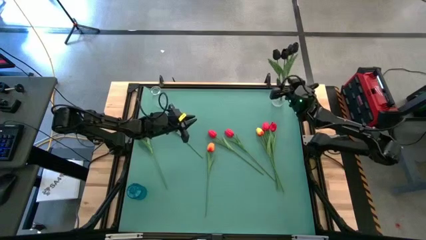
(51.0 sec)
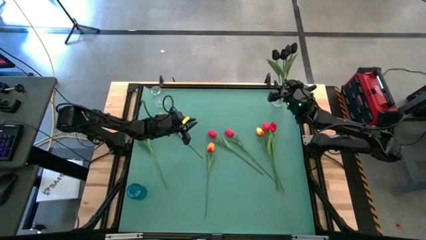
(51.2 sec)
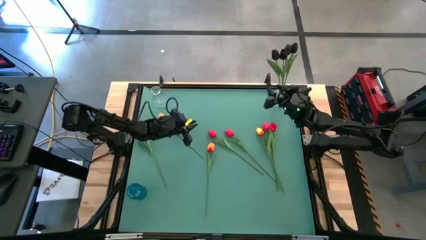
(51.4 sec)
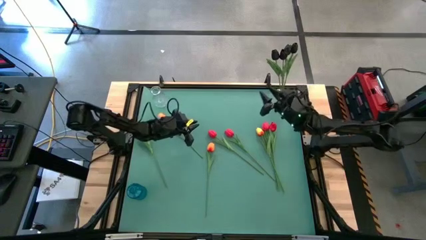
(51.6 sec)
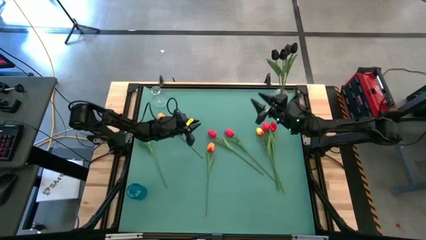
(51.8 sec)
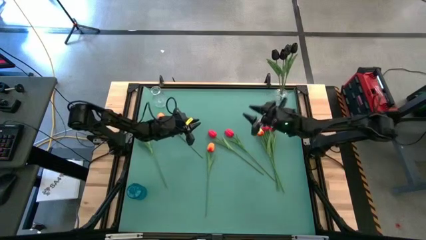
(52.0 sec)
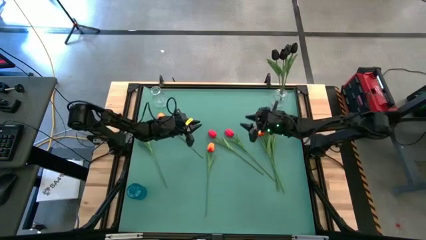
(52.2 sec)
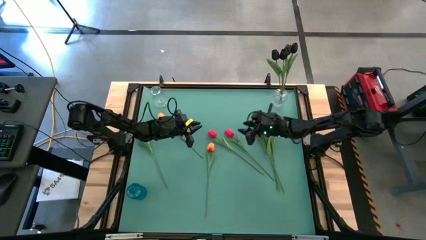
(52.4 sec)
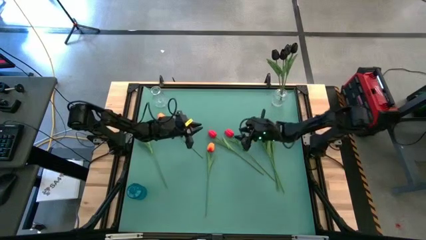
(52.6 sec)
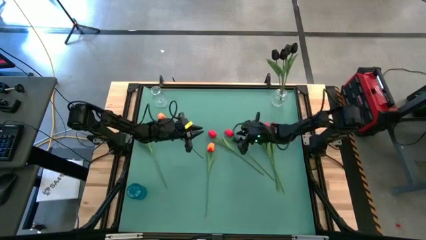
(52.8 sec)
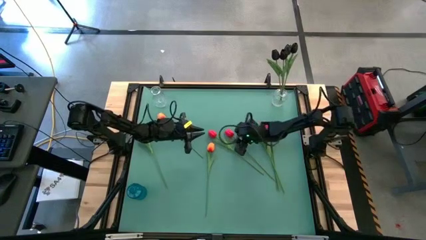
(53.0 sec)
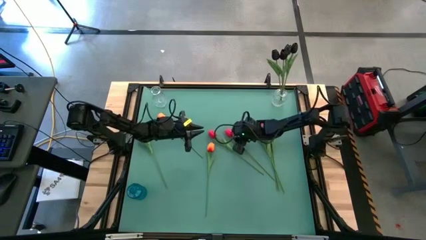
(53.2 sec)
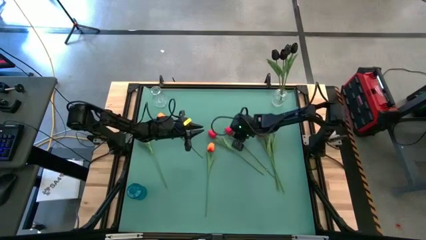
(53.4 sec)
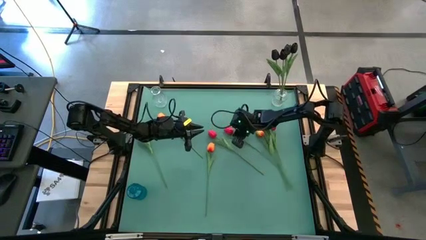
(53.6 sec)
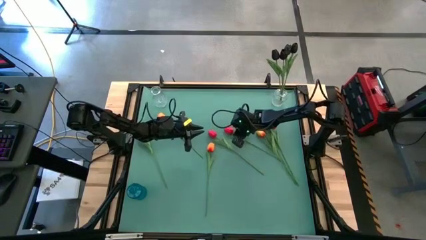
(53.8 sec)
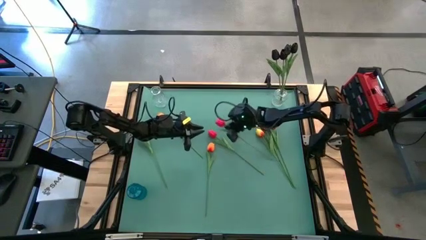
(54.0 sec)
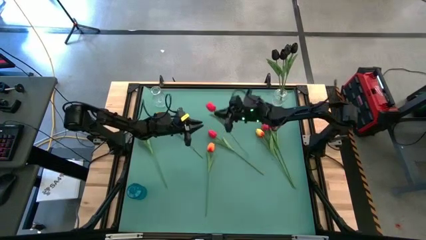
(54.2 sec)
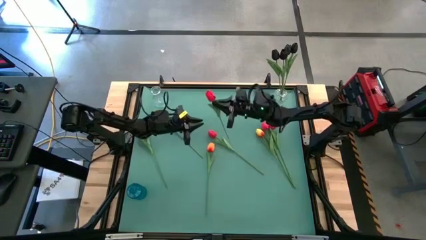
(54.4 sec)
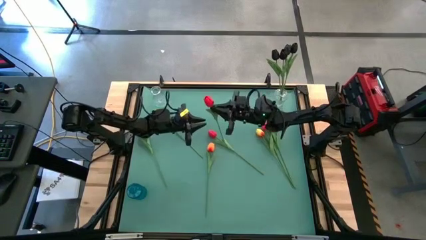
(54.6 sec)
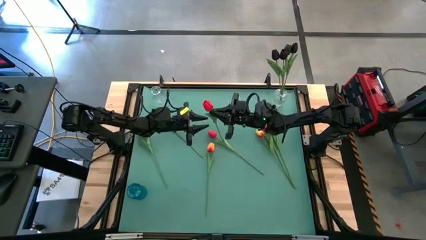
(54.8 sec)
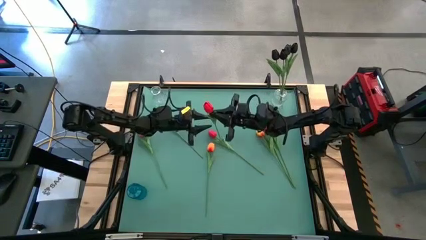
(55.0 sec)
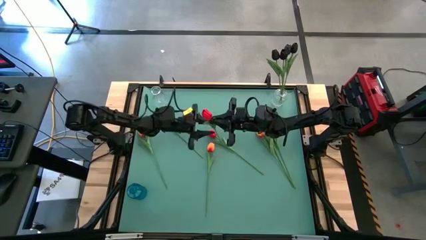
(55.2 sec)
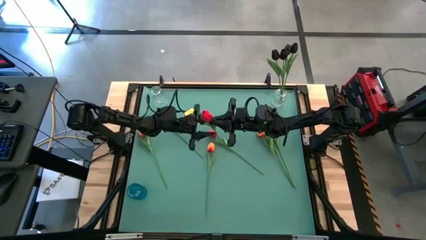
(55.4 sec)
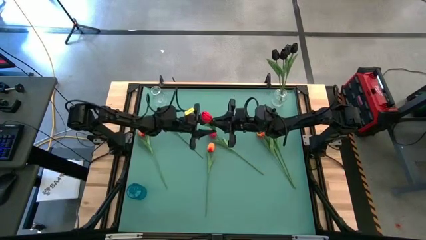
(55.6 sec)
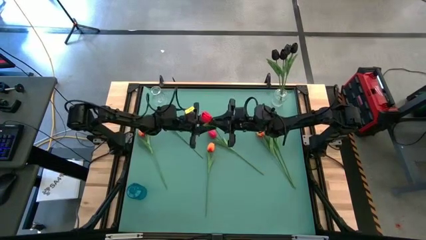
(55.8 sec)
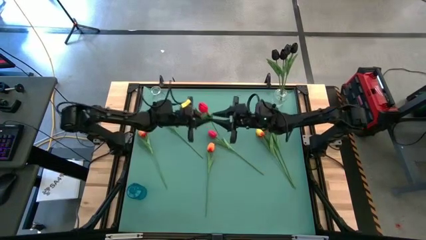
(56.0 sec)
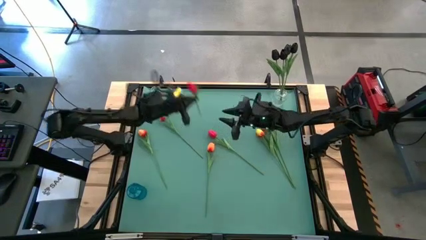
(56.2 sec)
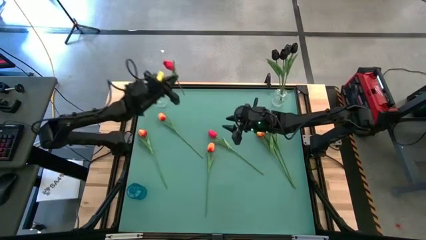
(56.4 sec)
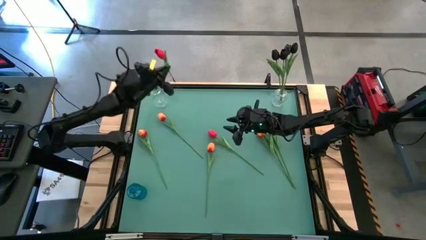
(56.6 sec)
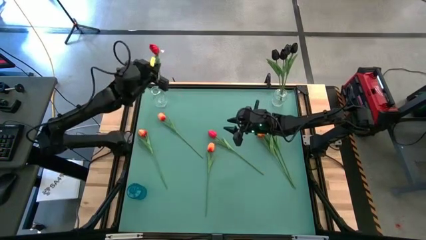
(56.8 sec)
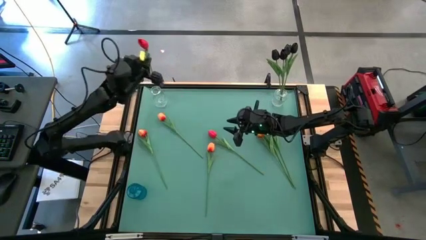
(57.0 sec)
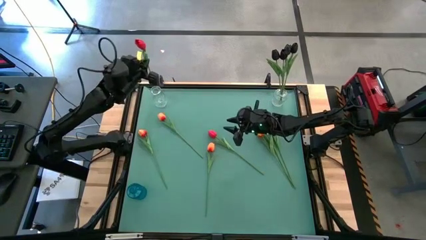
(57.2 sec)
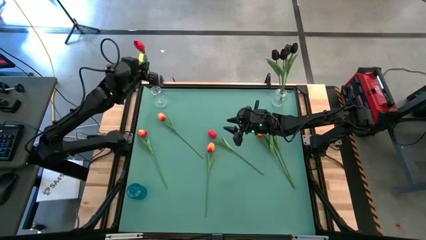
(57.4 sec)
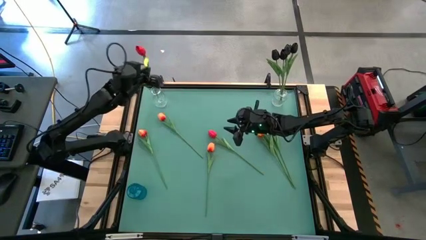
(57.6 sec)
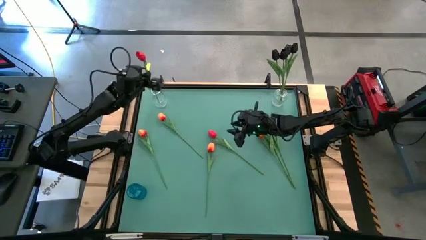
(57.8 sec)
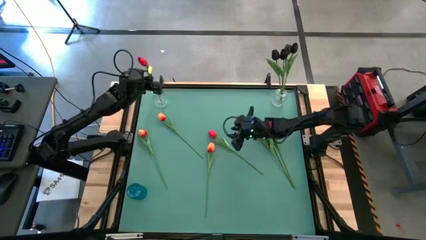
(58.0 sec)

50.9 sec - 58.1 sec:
Task: Sort flowers into vase by color
Put the red tulip into the left transparent vase

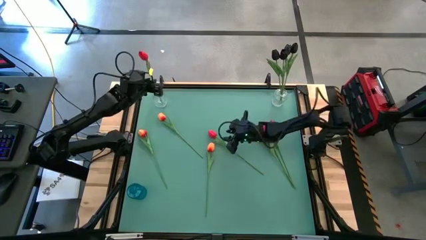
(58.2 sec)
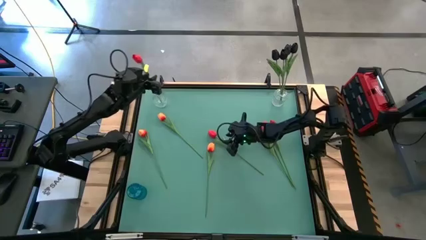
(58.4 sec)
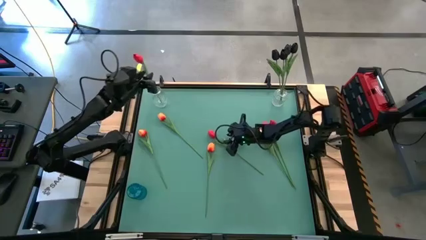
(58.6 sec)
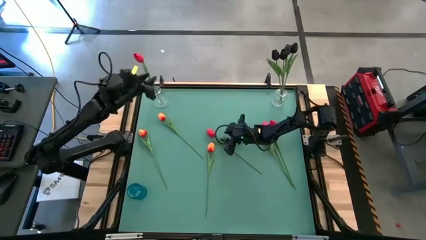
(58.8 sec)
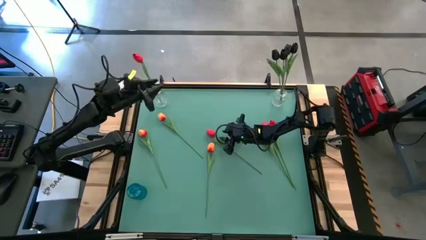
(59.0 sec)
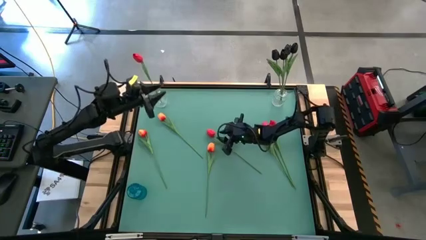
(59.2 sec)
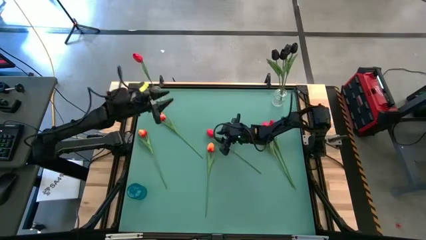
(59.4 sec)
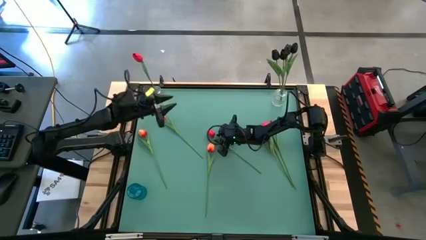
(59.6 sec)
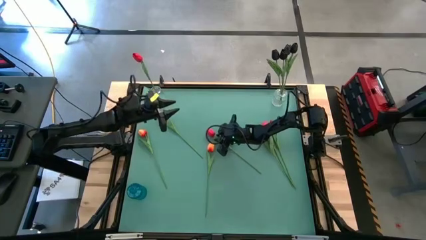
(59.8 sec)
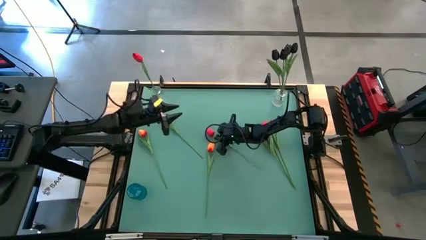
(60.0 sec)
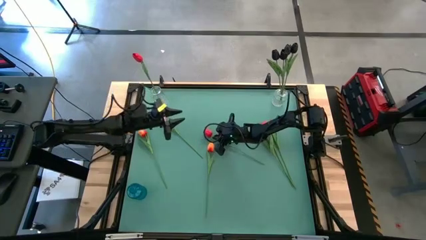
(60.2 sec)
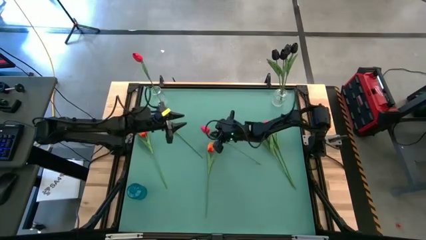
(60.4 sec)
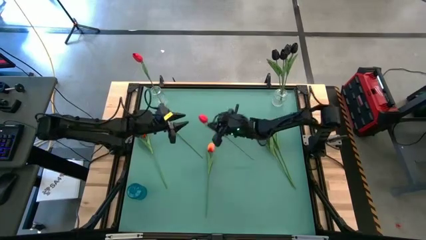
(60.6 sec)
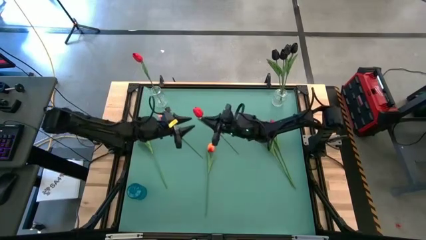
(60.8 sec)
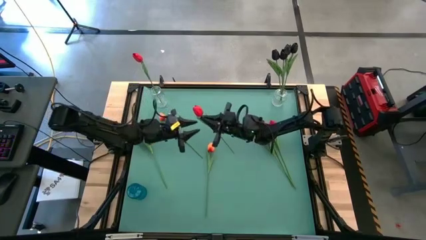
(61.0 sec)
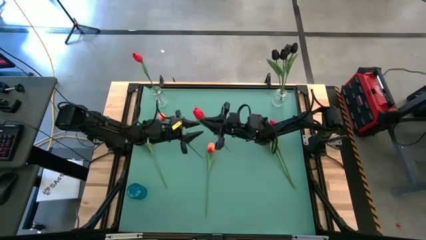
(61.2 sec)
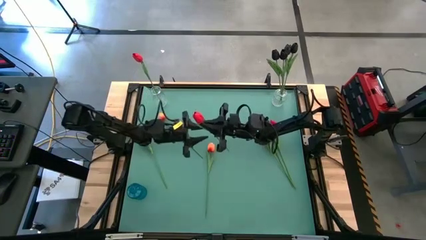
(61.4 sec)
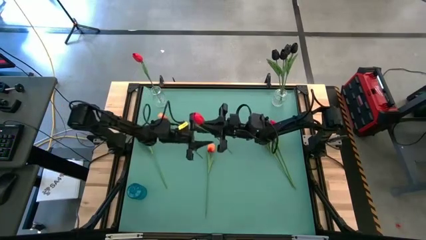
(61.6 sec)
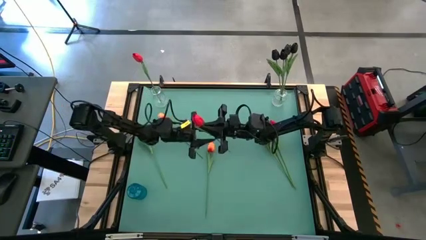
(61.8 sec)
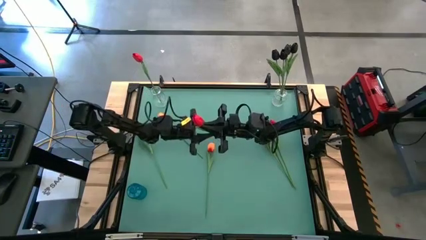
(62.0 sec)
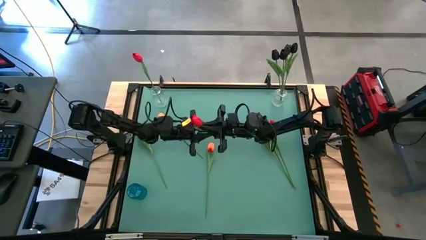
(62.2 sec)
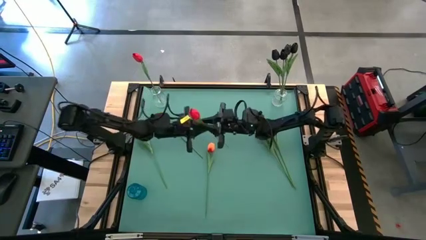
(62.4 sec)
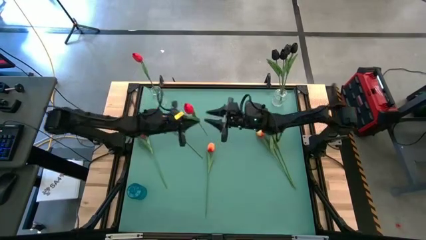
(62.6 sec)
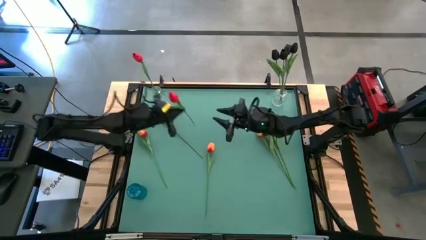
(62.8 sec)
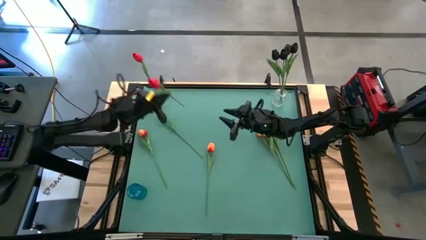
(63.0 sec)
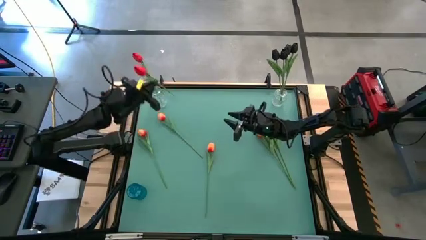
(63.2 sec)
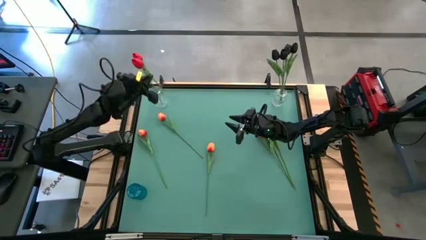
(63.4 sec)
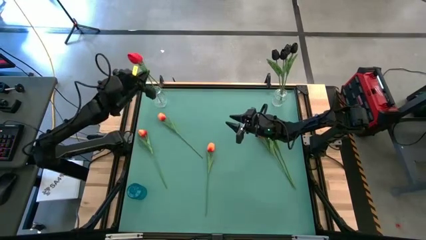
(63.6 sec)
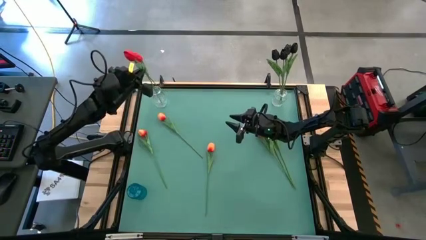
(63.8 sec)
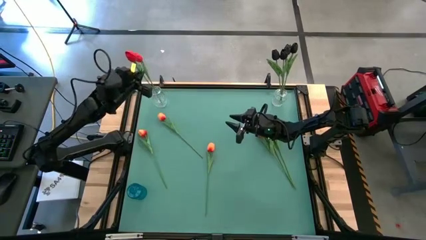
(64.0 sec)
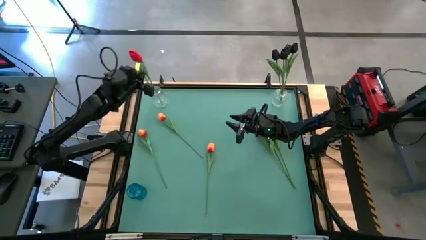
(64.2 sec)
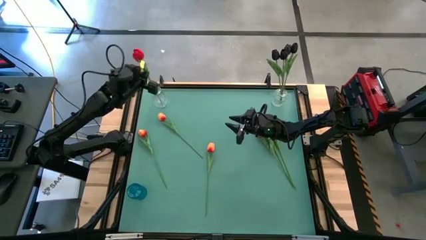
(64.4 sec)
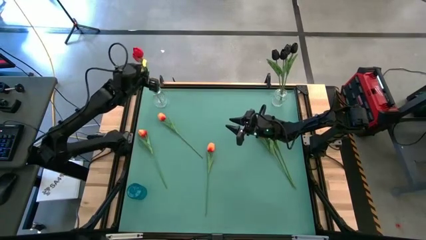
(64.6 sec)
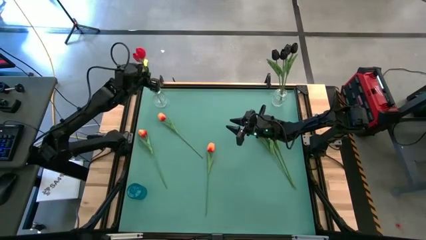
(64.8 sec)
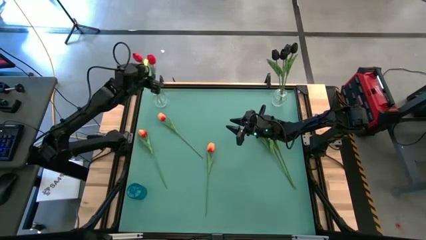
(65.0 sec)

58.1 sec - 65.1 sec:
Put the red tulip into the left transparent vase

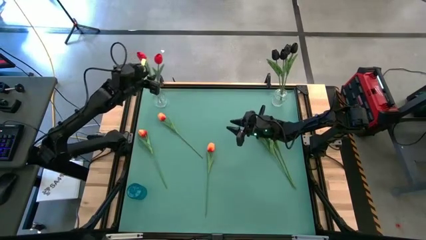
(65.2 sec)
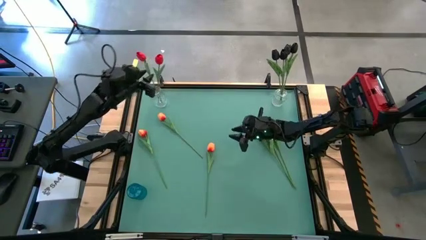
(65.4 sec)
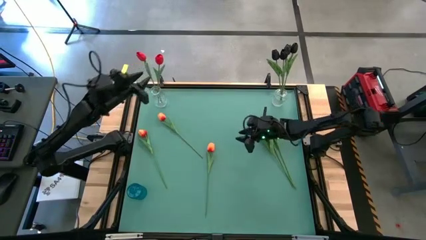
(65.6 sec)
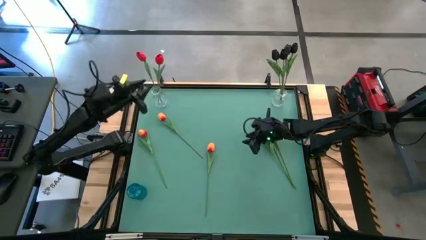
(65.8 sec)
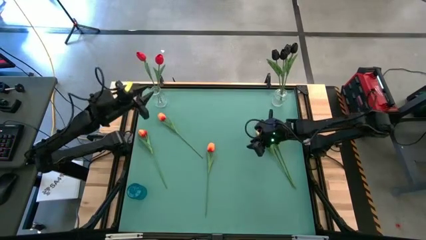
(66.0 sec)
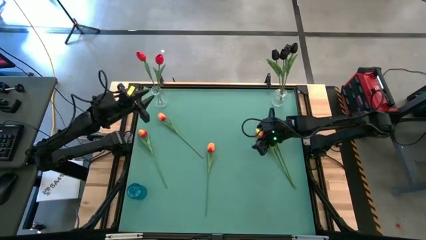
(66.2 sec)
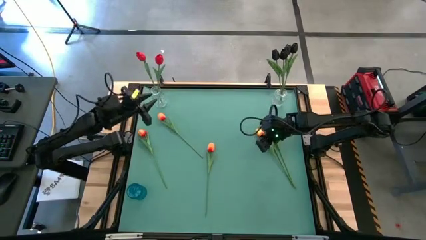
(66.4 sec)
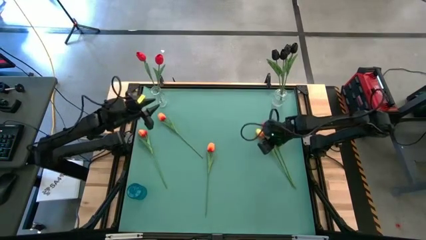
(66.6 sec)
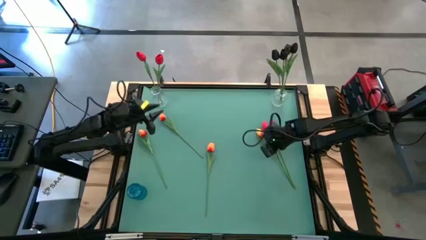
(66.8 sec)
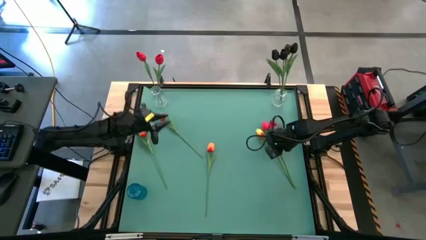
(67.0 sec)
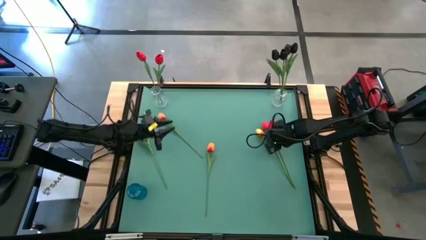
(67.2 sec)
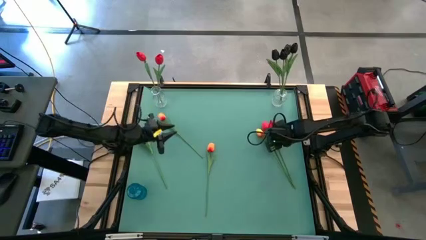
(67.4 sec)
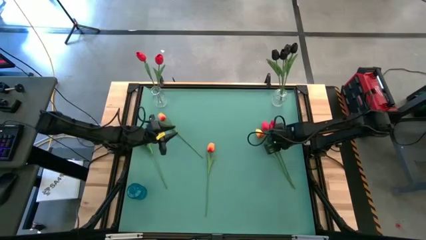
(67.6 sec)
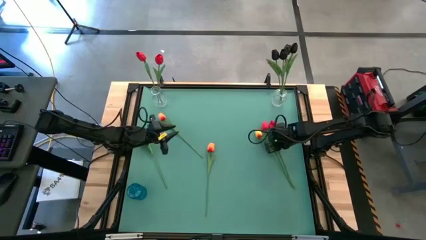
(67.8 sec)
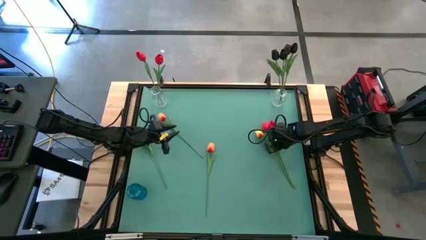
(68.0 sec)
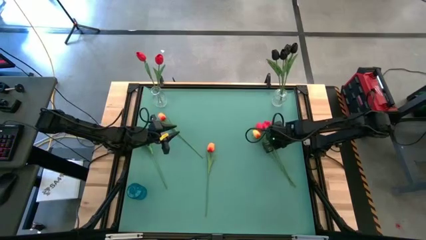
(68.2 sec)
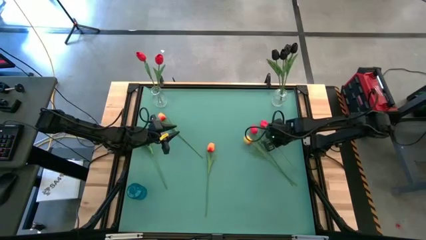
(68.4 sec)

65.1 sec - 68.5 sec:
Put the red tulip into the left transparent vase
